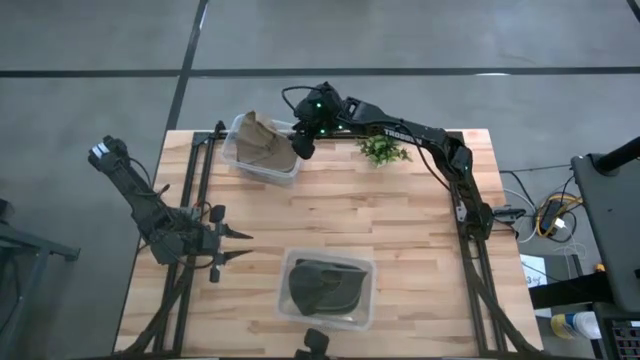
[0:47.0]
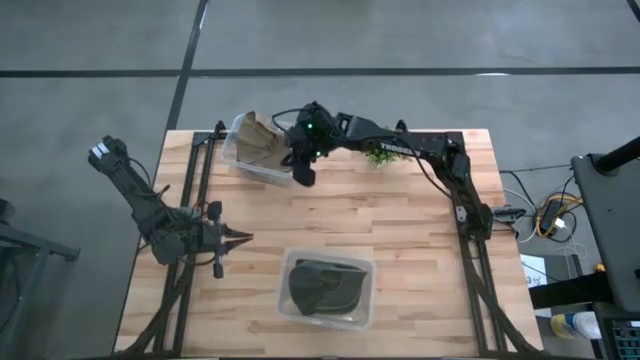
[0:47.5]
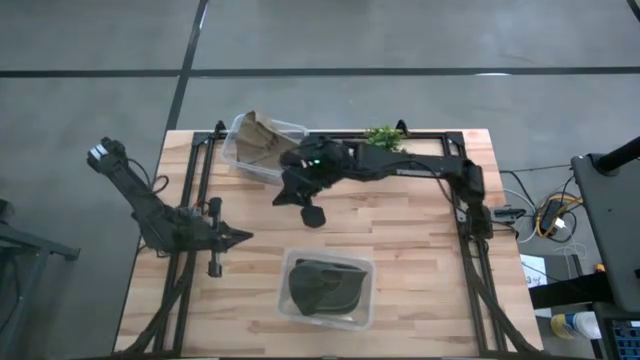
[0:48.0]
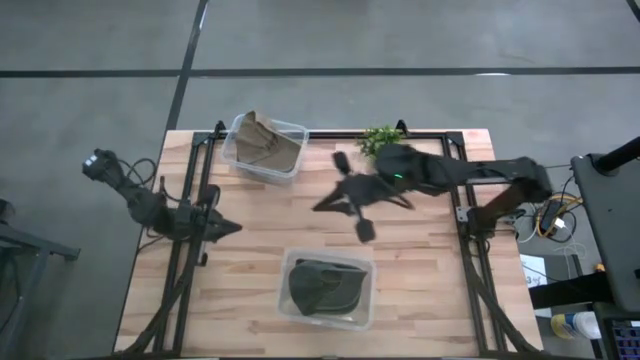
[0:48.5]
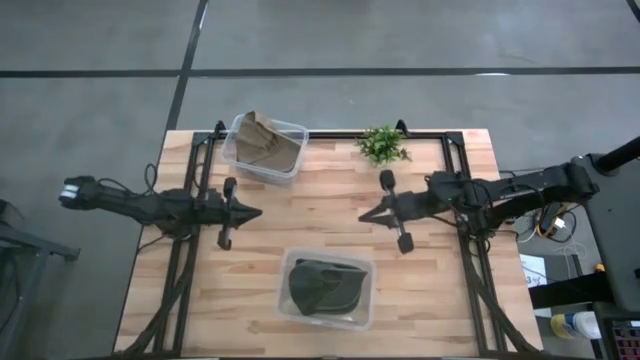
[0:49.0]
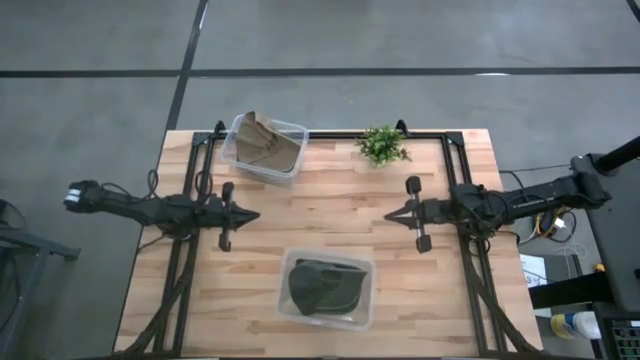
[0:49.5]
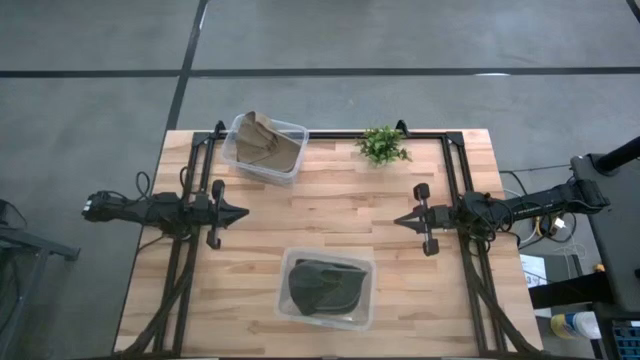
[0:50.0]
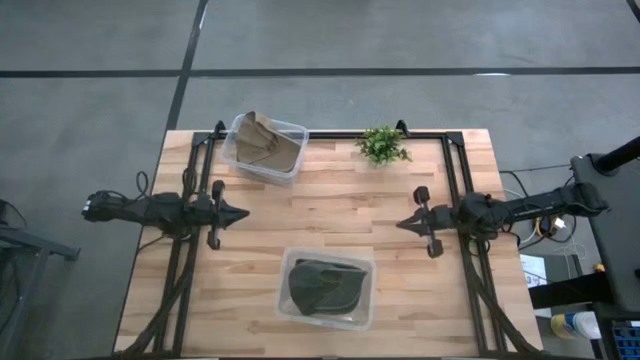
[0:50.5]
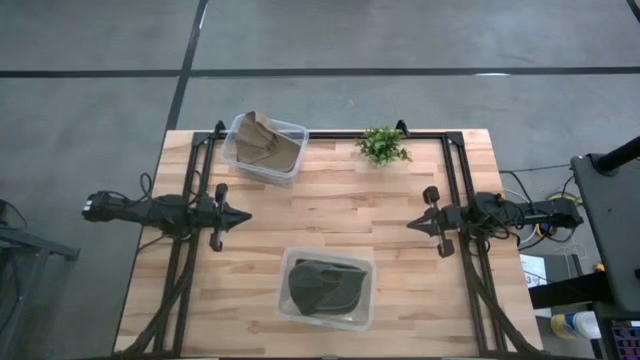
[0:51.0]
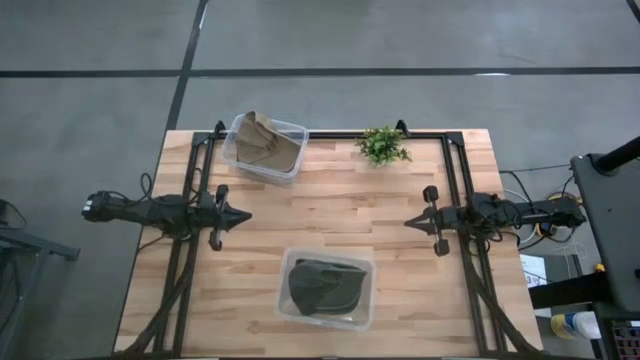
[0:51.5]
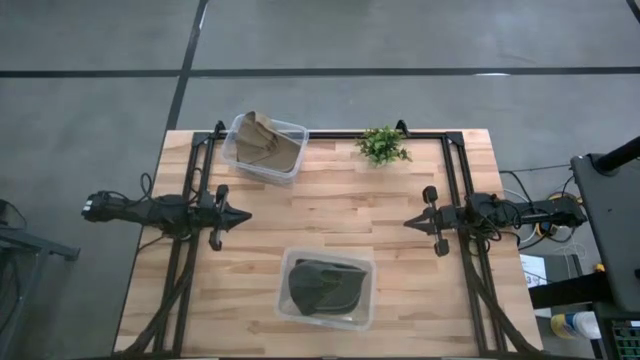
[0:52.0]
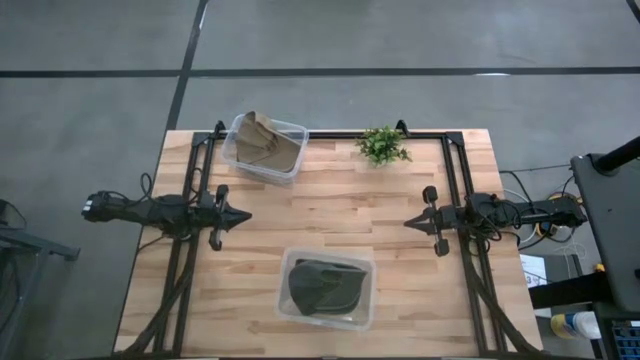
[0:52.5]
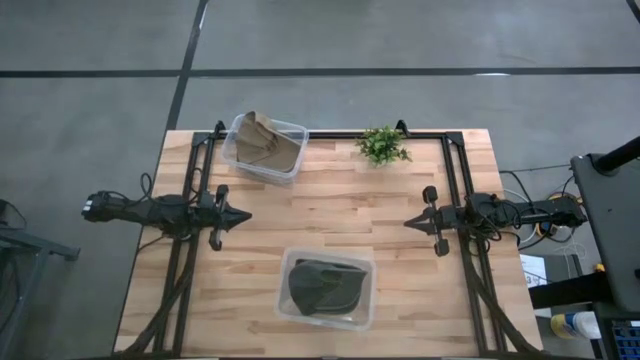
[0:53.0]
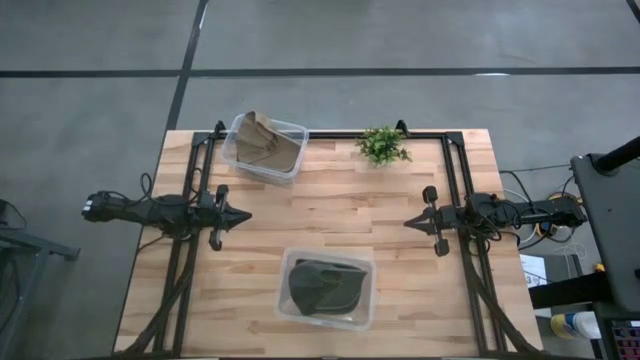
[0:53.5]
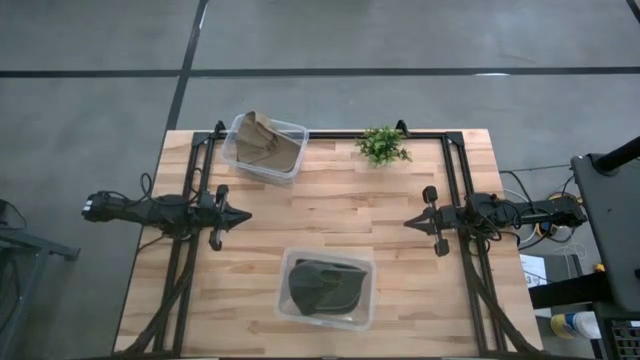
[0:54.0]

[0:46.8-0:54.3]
Task: Pick & Place hat
Return to Home Position

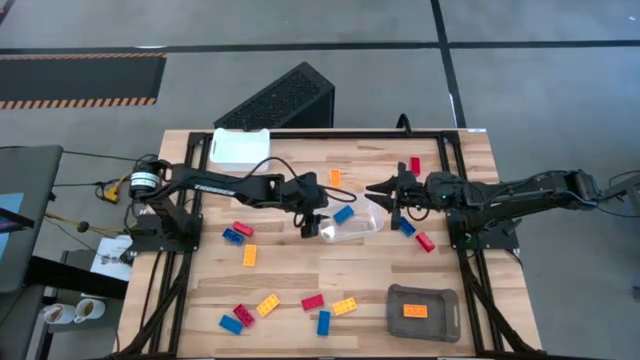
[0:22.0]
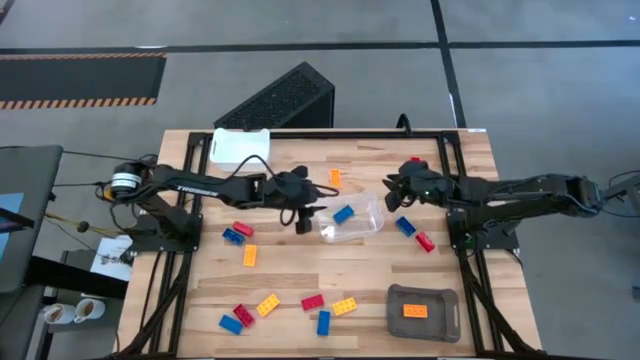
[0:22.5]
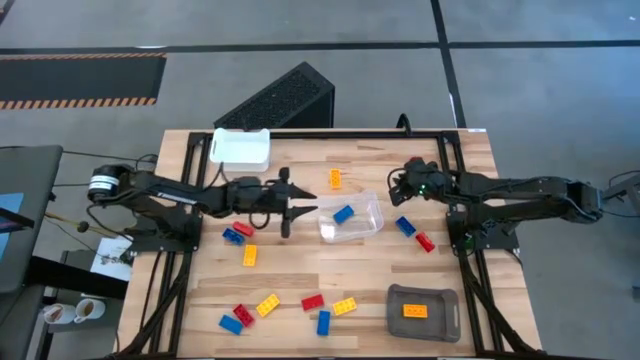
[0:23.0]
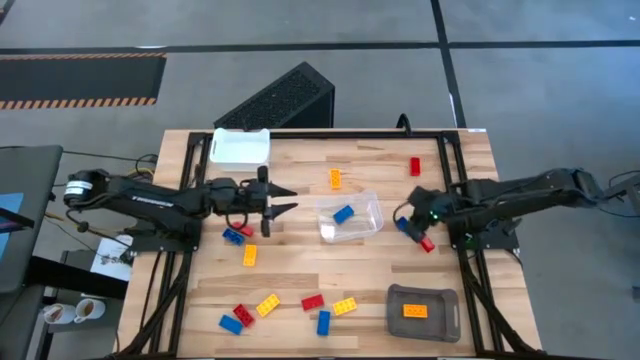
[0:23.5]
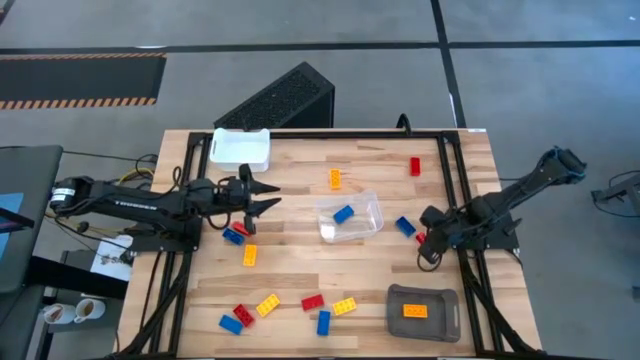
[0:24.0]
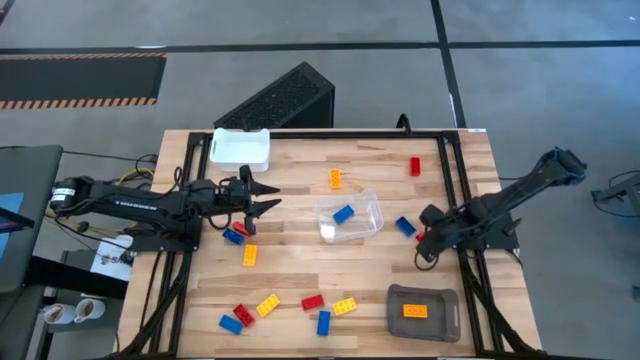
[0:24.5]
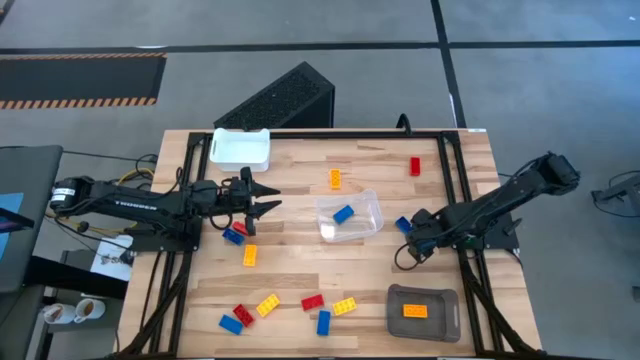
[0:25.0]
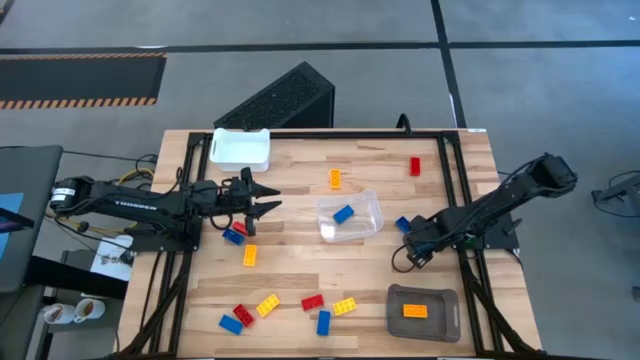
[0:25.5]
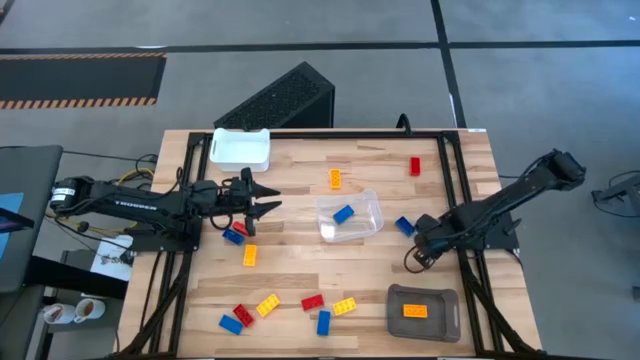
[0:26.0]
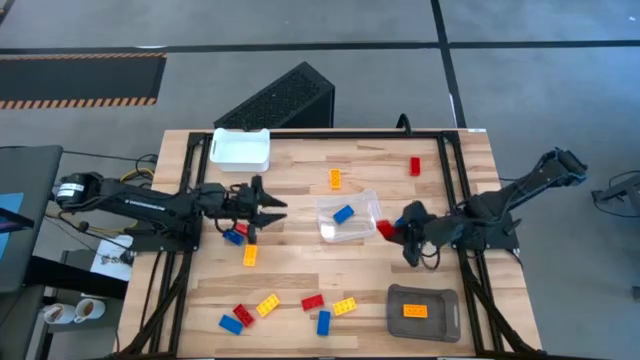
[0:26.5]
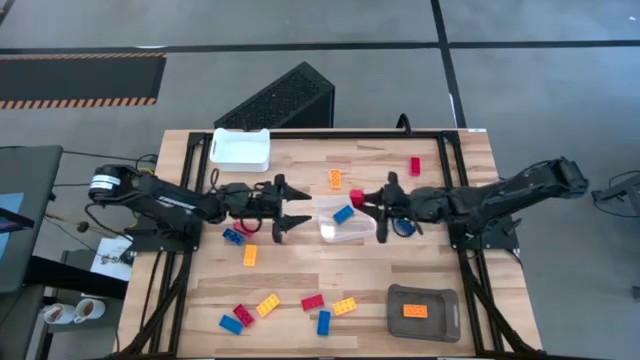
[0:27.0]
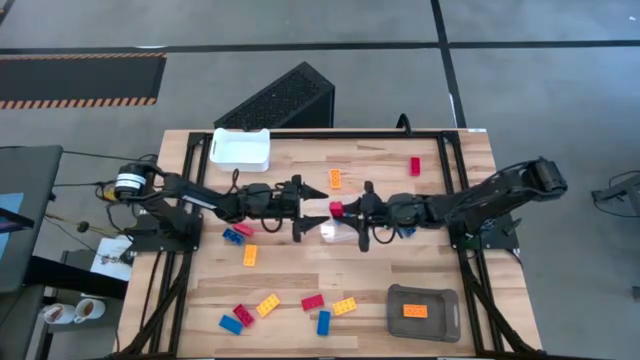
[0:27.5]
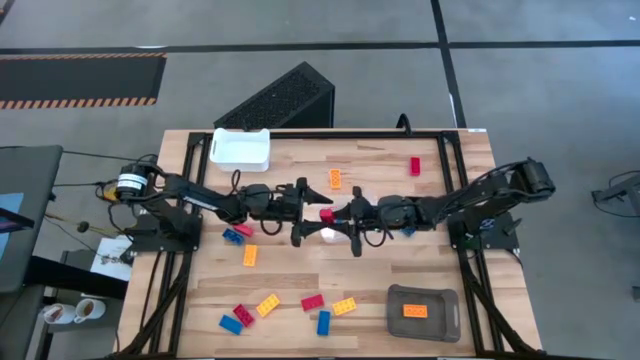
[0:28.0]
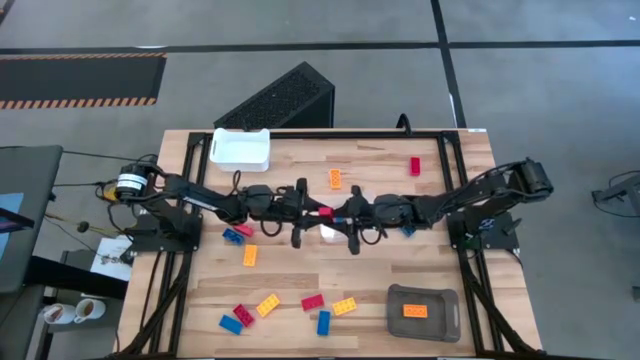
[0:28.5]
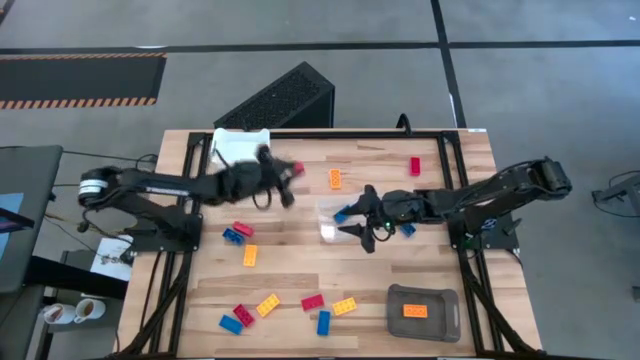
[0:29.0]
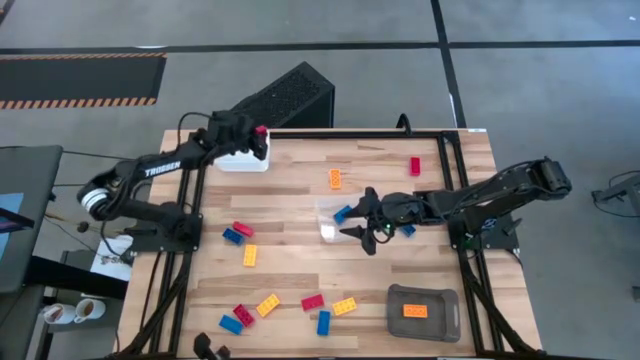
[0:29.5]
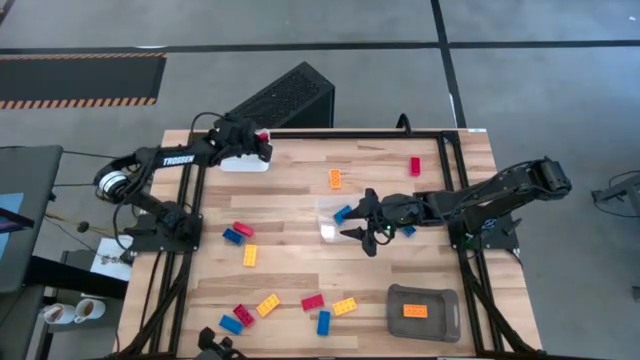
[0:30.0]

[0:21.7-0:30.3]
Task: Sort & place blocks by color
Put the red game piece into the white bin

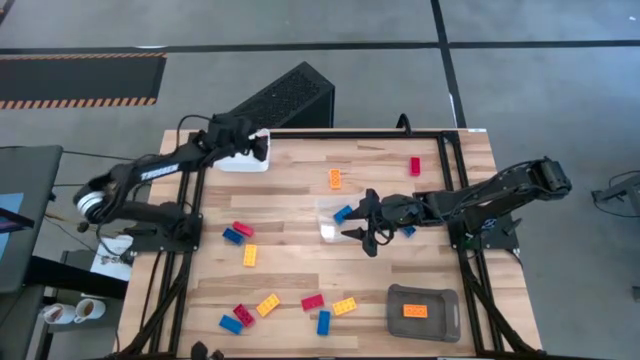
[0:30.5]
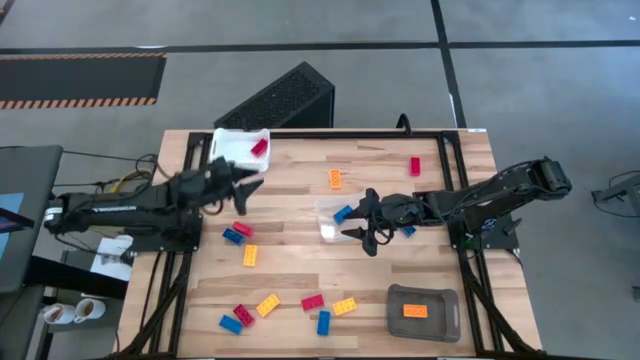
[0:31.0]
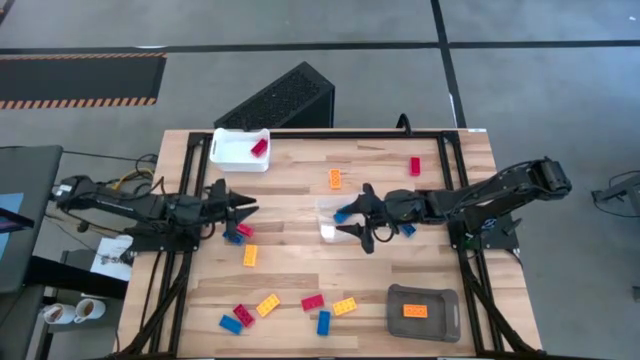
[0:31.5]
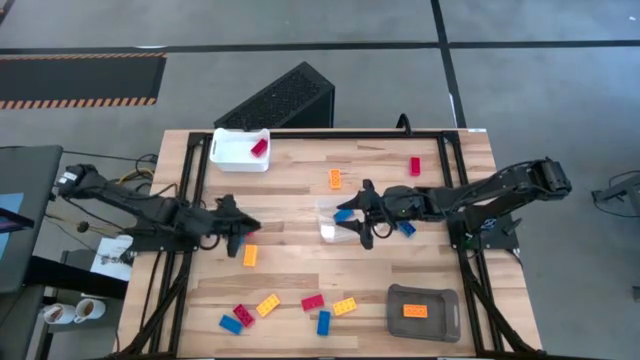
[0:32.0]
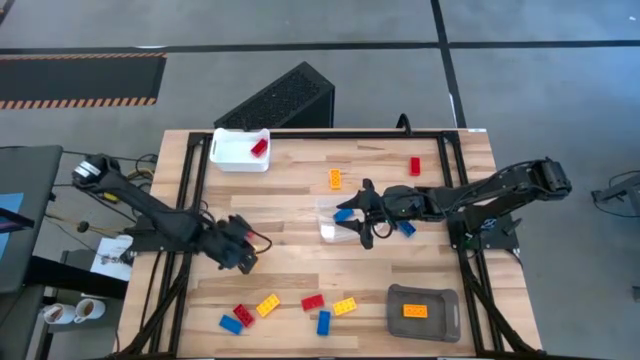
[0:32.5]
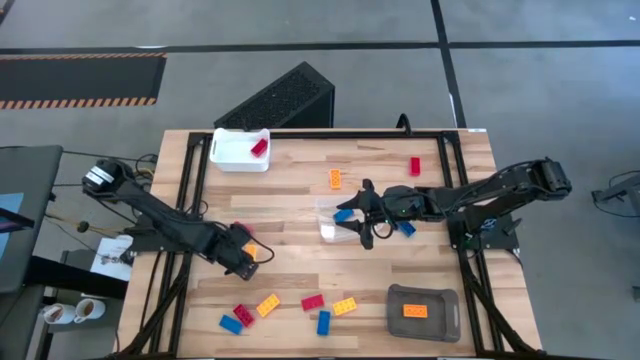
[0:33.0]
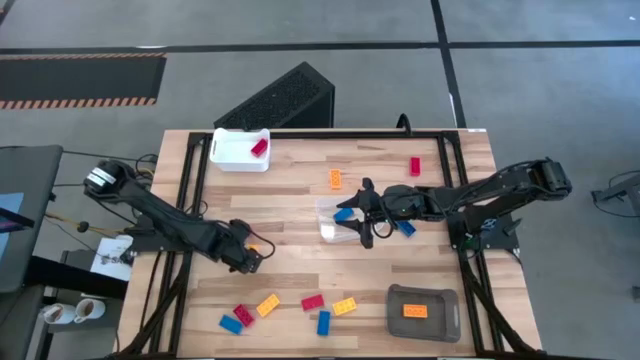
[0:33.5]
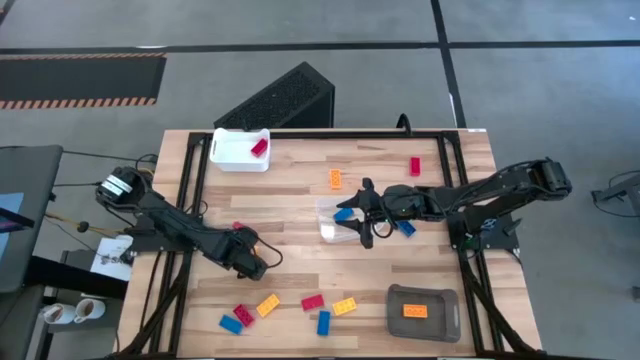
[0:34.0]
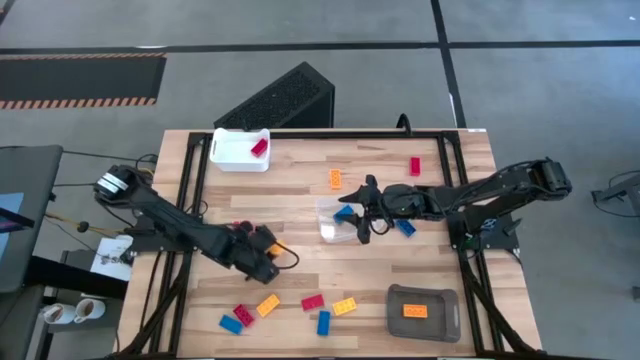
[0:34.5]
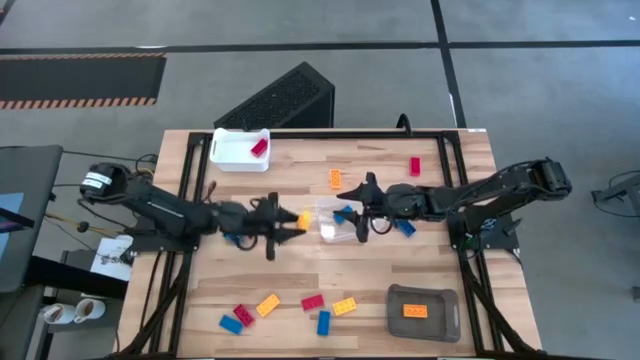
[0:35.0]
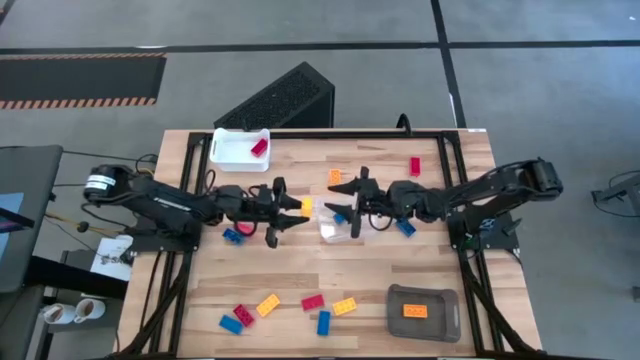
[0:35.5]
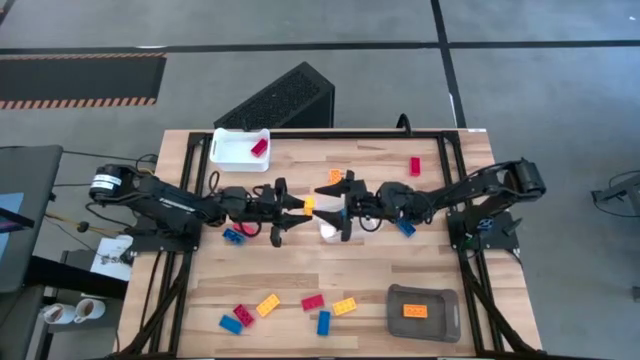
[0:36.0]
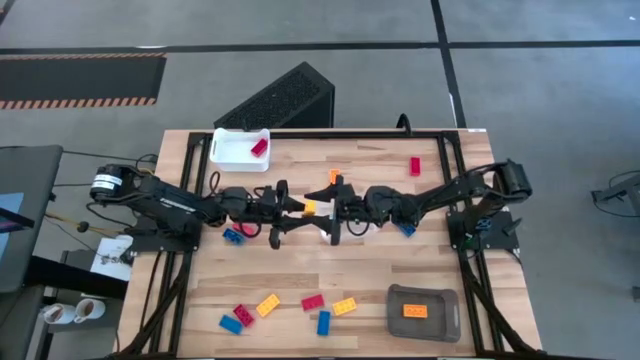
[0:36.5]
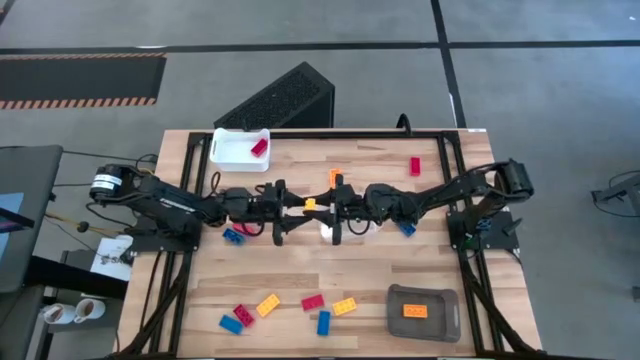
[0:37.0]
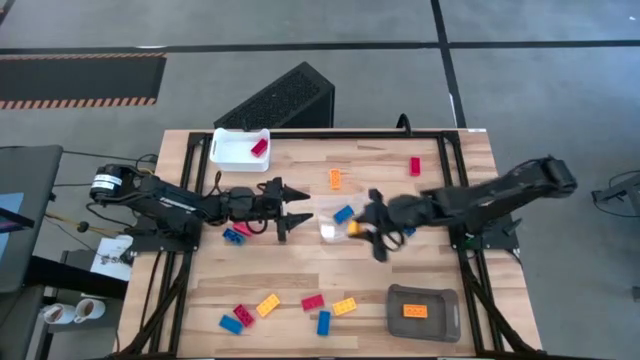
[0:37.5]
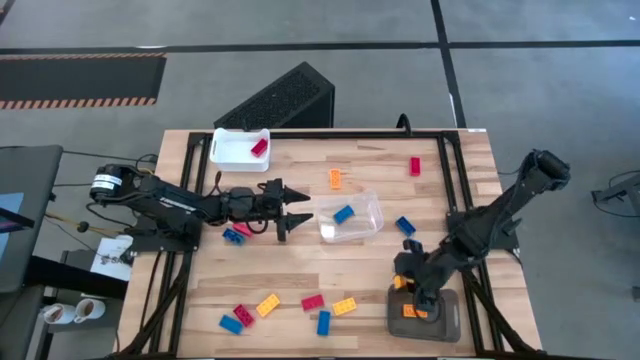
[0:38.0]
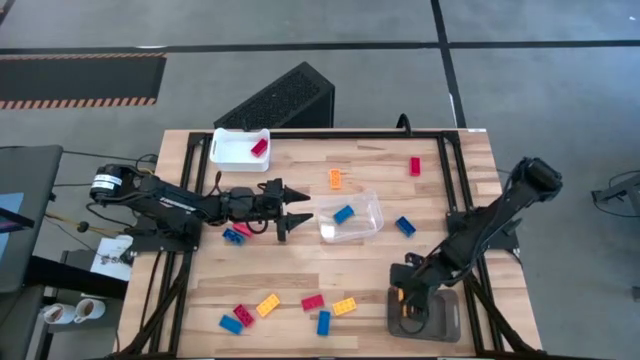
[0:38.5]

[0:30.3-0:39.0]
Put the yellow game piece into the black bin
